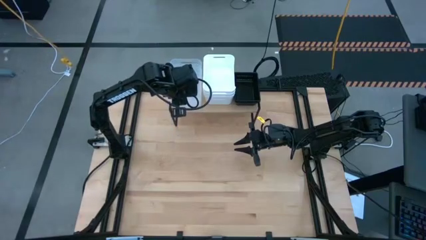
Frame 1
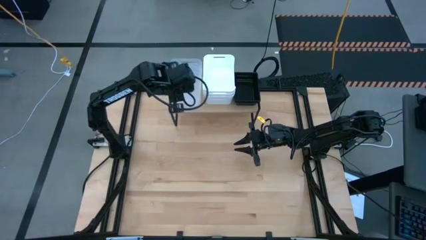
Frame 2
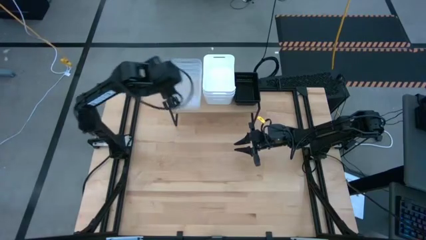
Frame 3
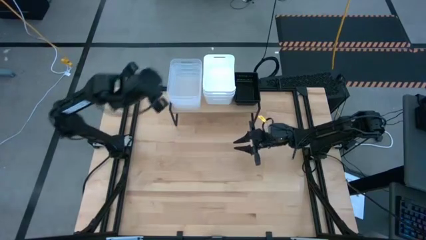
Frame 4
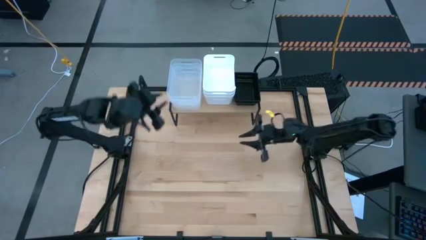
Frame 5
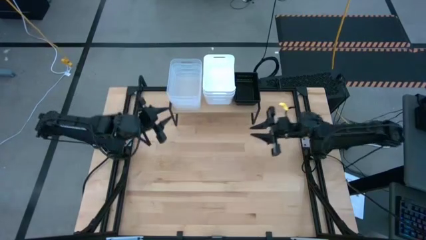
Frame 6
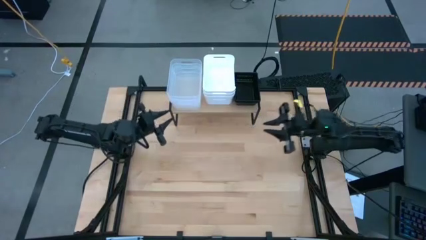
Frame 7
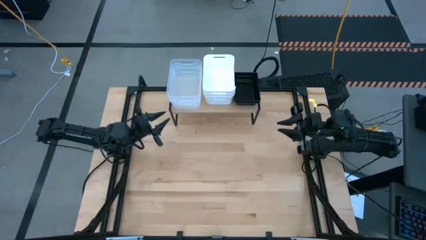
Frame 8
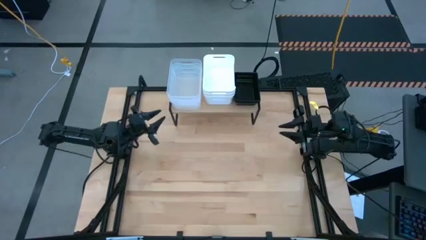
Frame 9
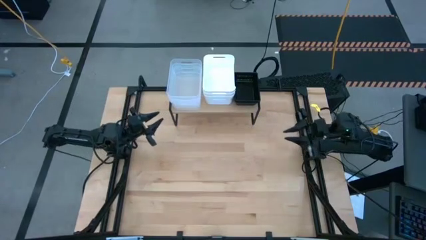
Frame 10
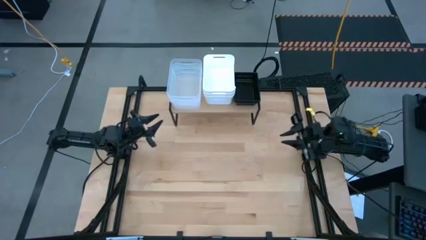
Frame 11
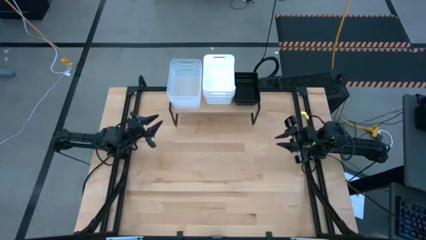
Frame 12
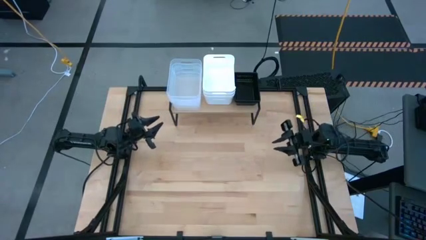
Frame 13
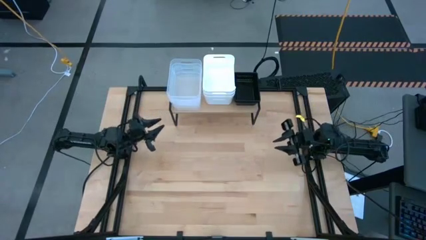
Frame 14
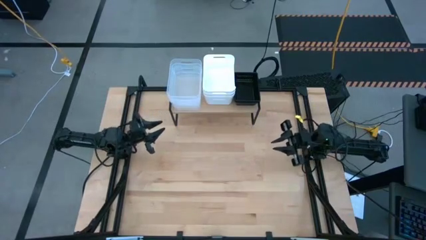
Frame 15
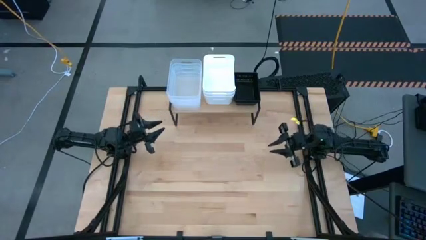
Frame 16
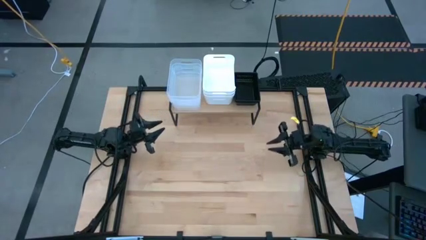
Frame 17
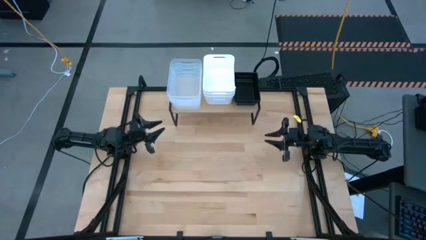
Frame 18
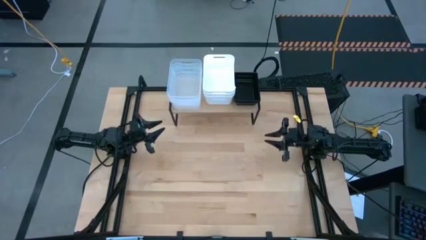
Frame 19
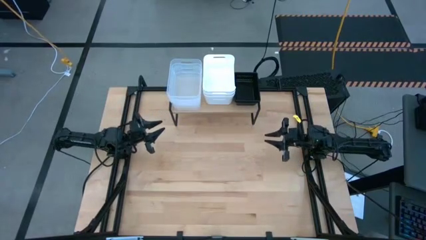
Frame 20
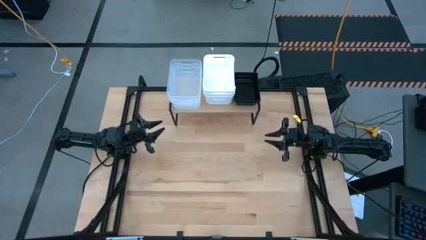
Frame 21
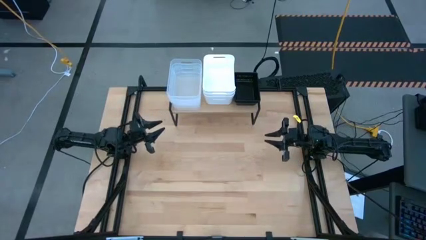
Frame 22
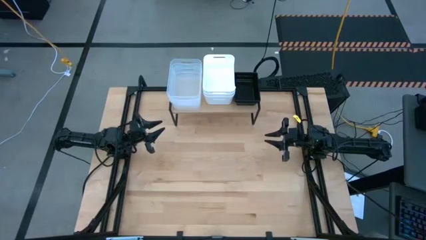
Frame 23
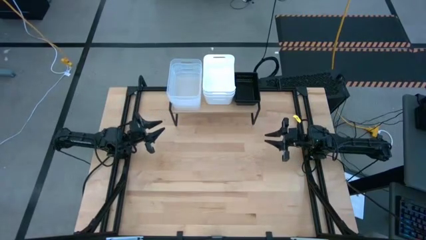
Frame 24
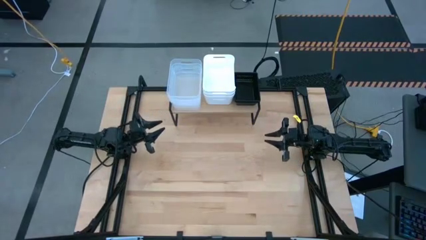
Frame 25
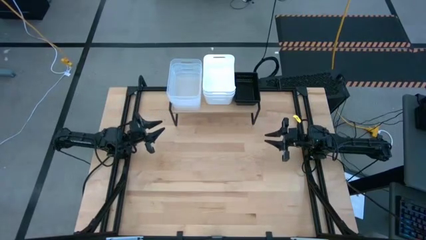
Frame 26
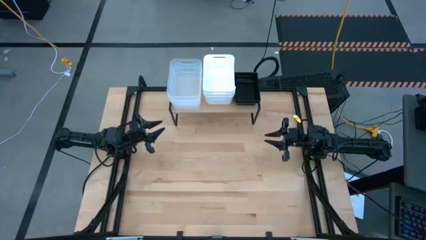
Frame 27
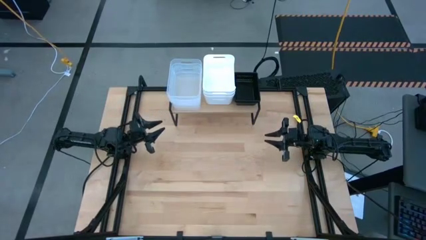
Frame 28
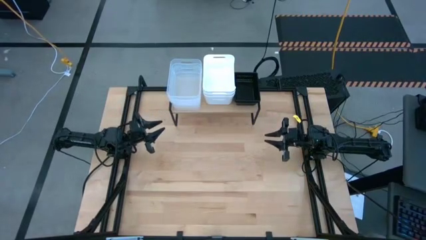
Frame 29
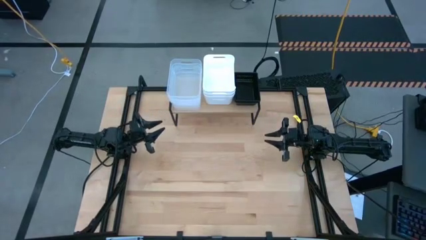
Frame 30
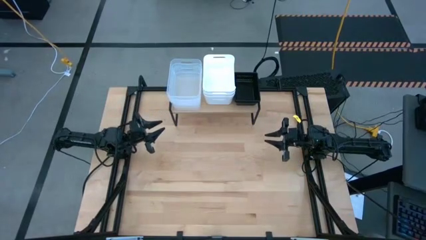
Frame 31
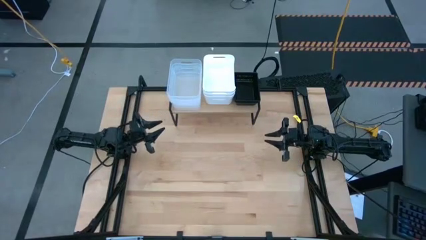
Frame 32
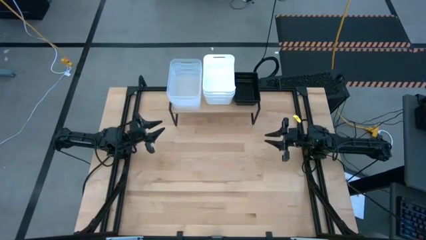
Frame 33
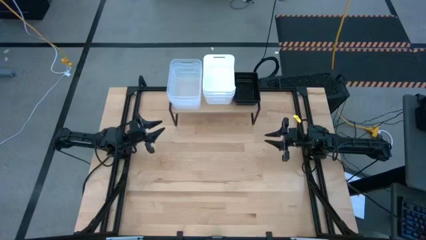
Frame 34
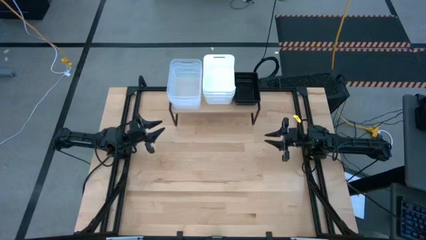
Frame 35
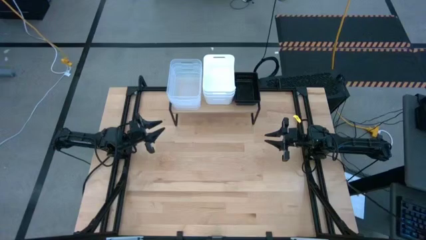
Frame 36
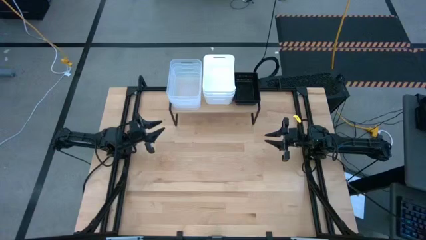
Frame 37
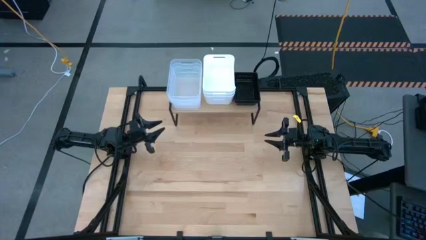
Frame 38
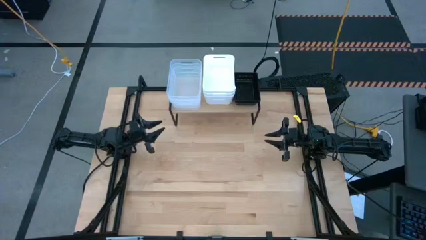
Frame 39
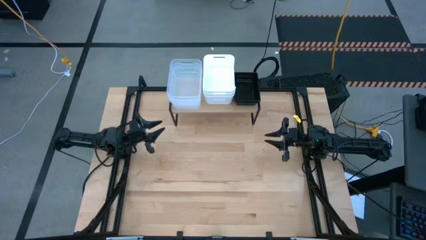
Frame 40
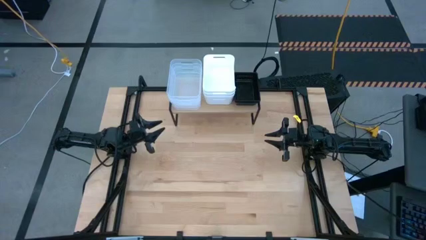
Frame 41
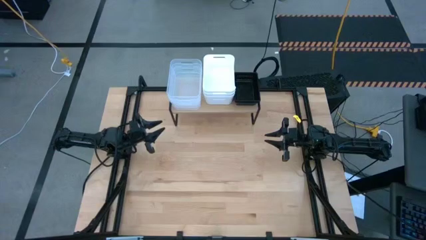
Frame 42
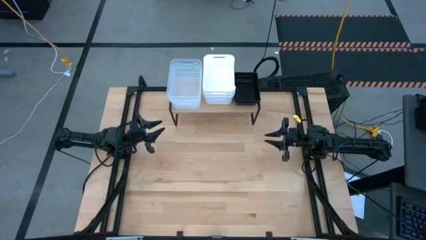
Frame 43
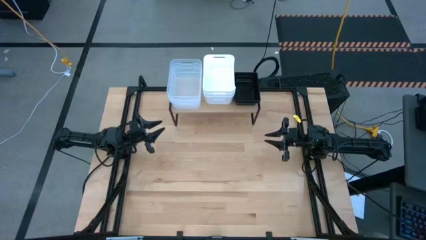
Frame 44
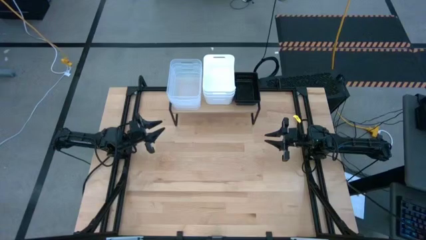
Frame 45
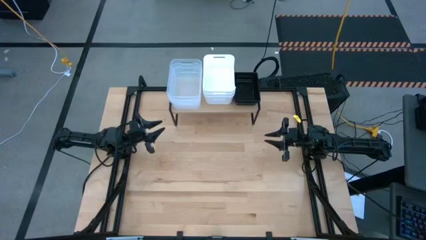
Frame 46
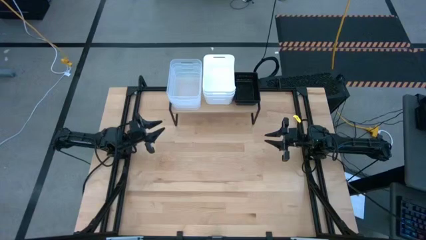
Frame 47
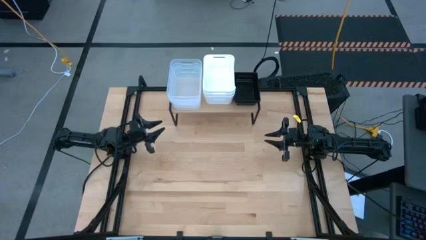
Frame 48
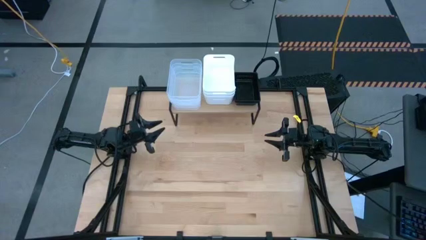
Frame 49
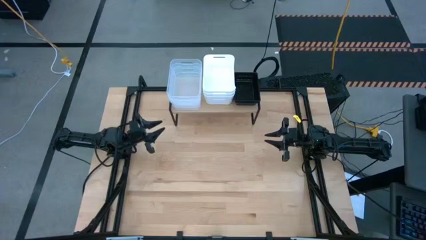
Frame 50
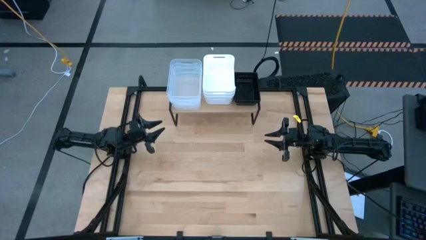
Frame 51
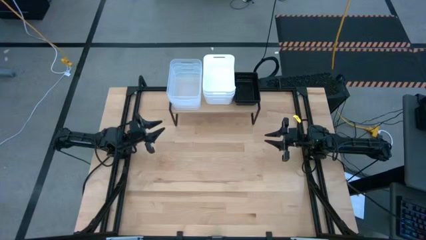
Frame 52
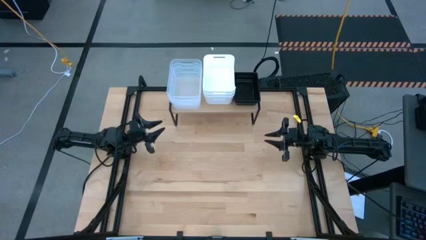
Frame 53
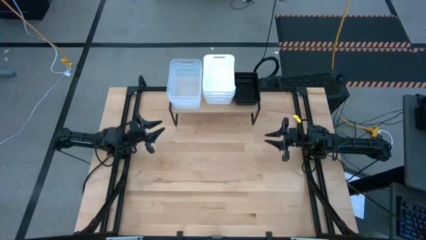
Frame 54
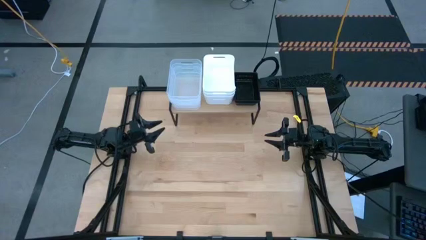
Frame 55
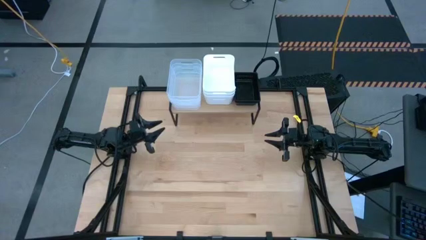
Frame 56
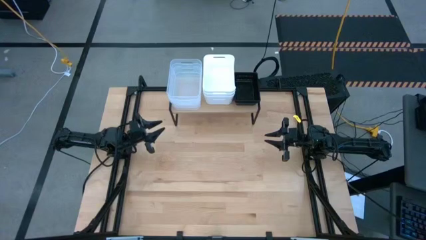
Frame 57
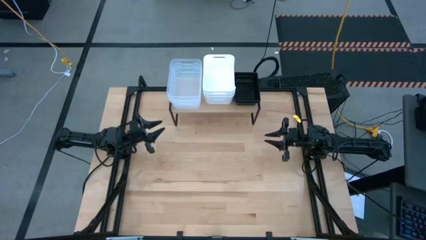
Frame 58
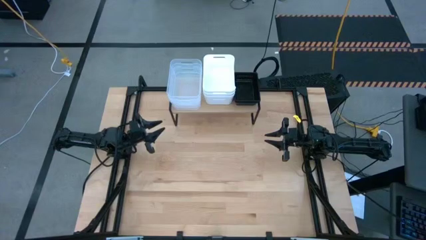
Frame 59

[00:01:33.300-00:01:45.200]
Task: Stack baskets on shelf by color
Return to Home Position

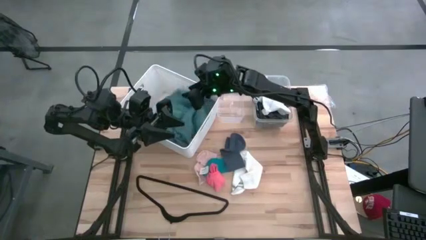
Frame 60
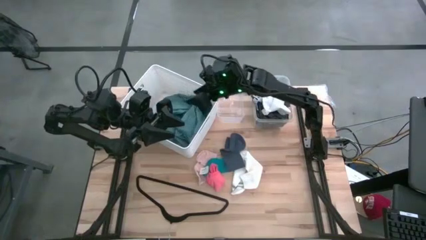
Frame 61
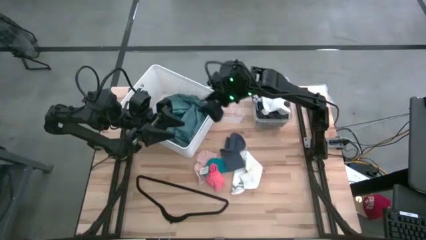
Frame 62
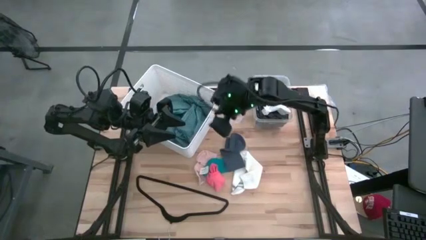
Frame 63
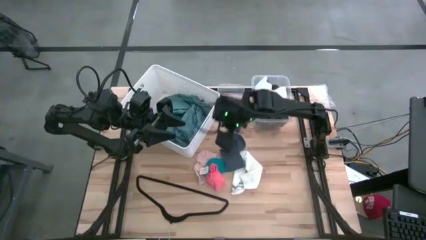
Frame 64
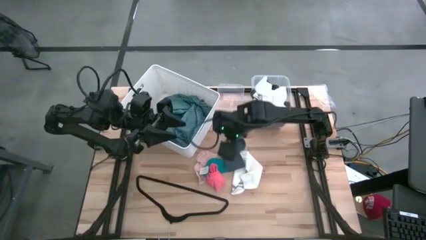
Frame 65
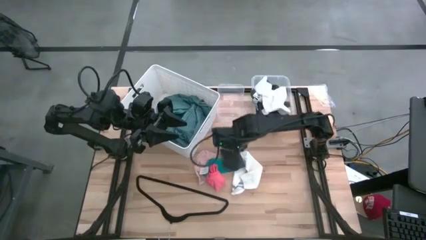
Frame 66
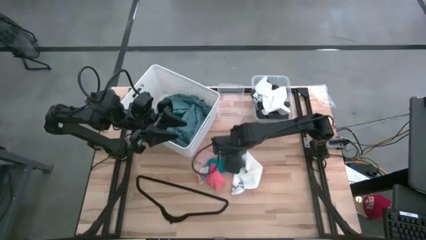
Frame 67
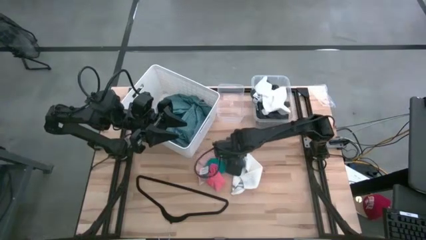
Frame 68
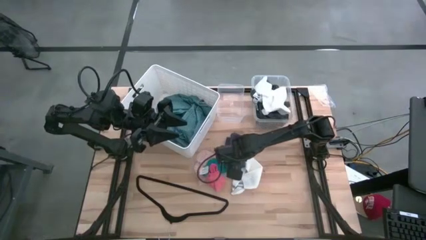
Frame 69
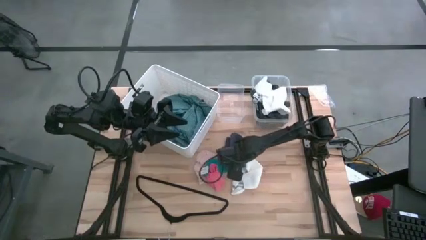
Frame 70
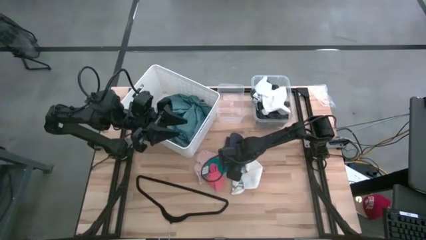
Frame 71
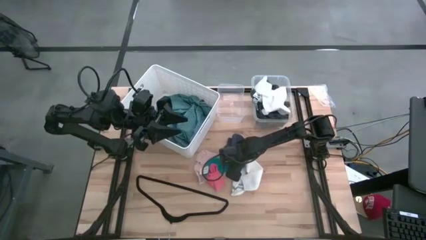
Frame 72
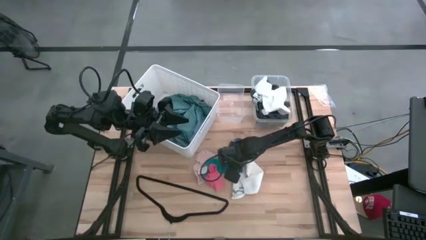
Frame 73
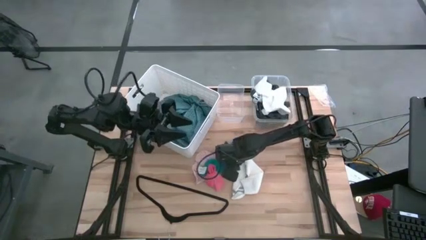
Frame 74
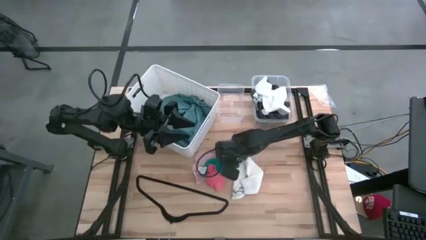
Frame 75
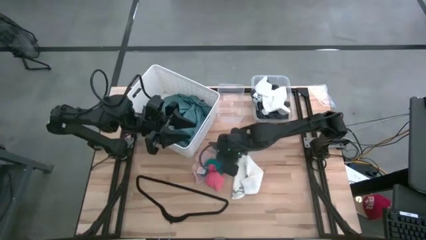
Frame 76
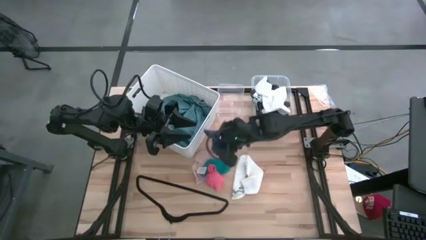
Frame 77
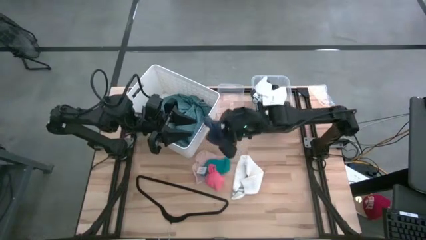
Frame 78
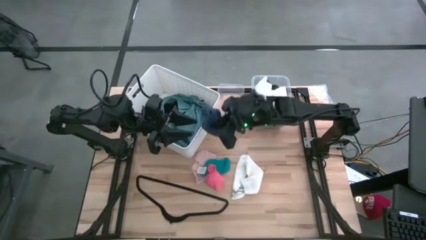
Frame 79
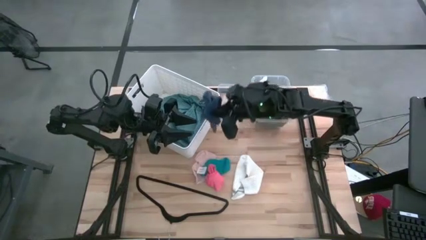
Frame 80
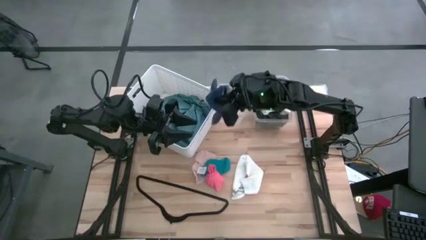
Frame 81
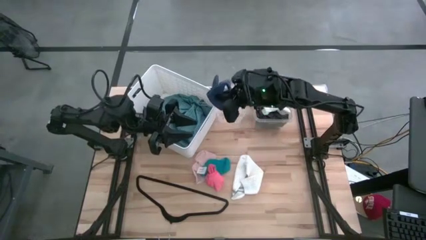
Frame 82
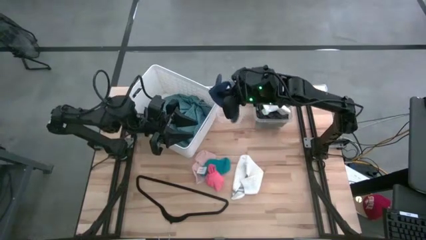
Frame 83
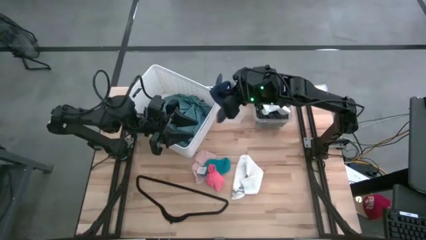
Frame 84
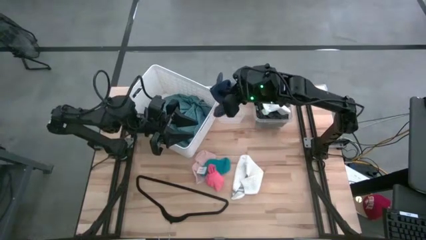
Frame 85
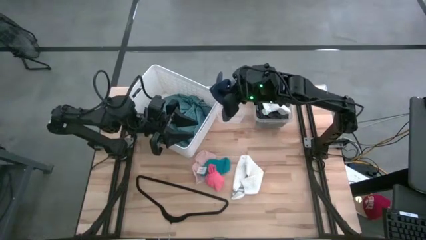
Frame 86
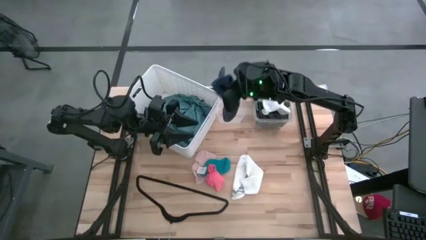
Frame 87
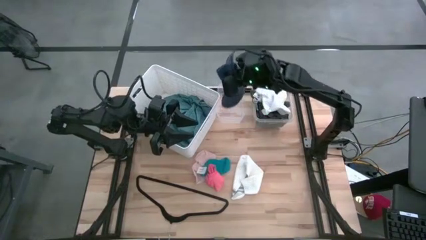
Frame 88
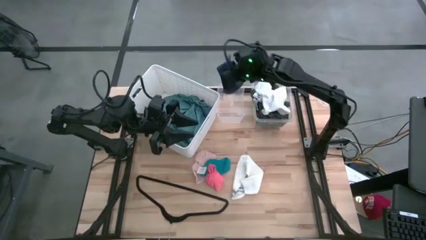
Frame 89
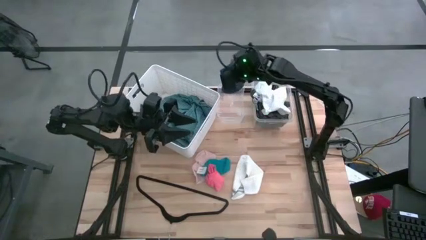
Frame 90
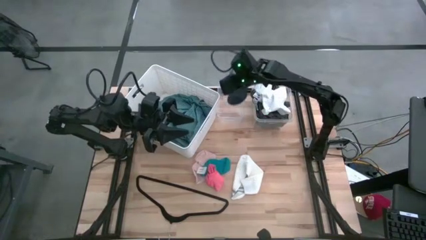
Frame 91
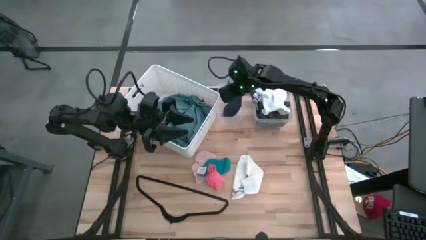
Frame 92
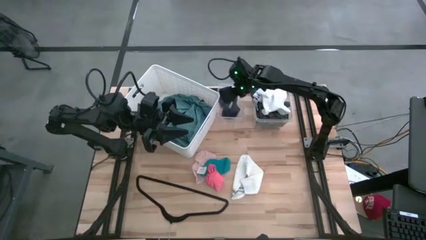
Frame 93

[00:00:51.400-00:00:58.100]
Task: Pick & Place Cloths
Put the dark blue sock into the left transparent bin
